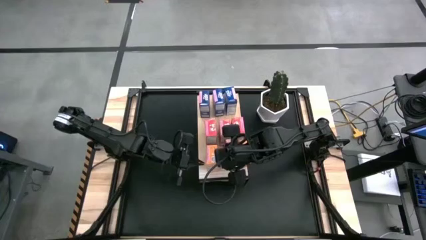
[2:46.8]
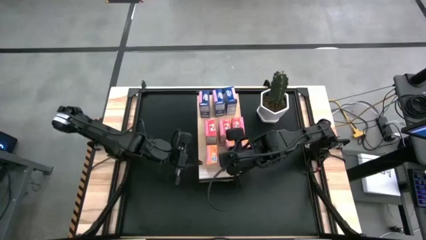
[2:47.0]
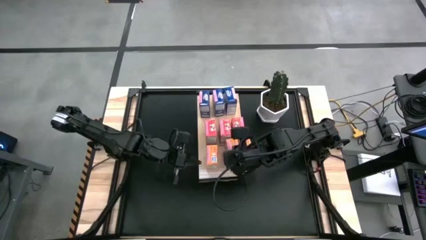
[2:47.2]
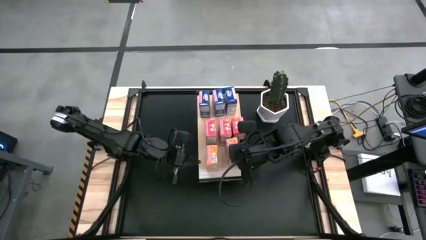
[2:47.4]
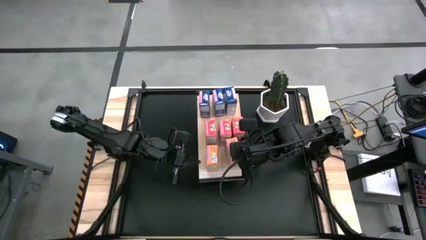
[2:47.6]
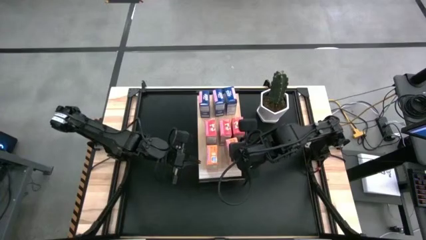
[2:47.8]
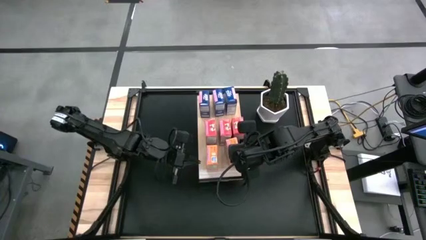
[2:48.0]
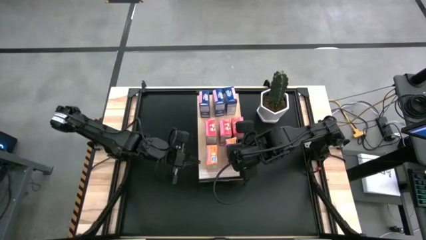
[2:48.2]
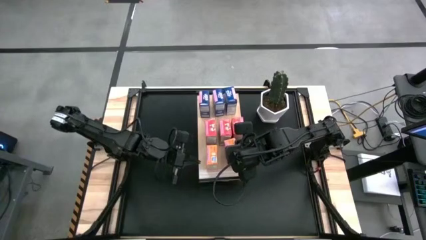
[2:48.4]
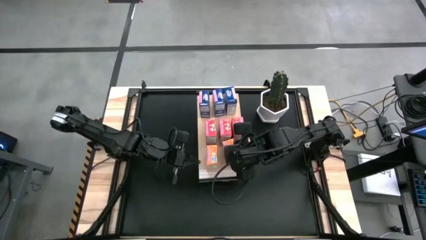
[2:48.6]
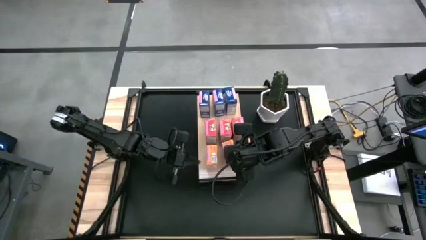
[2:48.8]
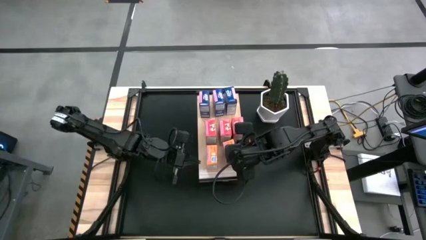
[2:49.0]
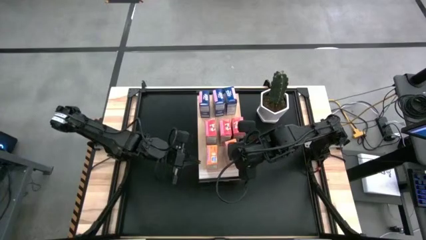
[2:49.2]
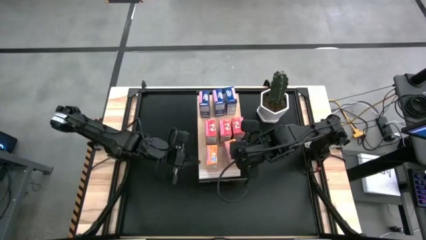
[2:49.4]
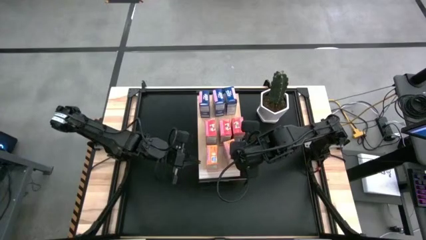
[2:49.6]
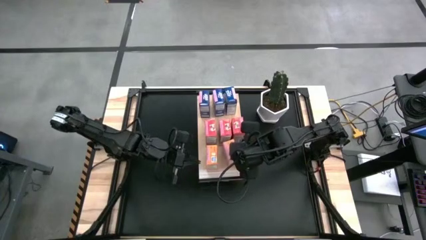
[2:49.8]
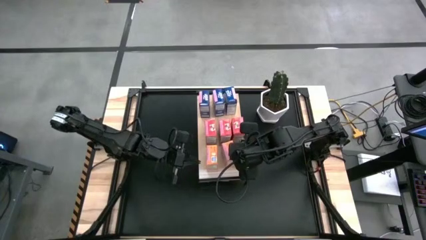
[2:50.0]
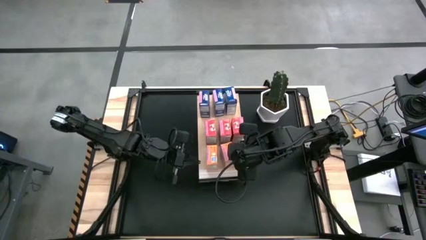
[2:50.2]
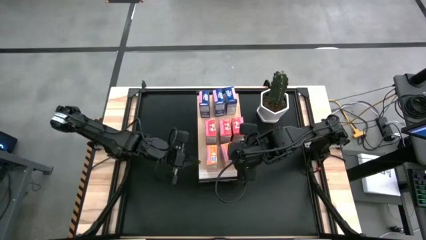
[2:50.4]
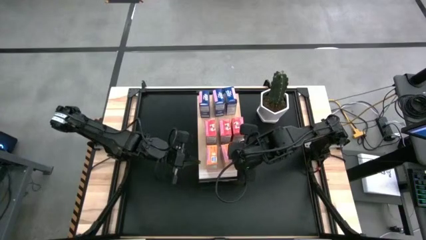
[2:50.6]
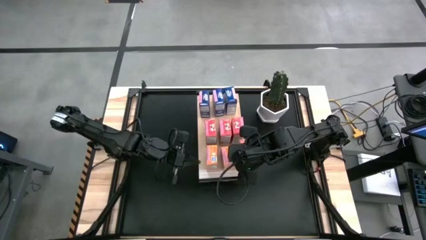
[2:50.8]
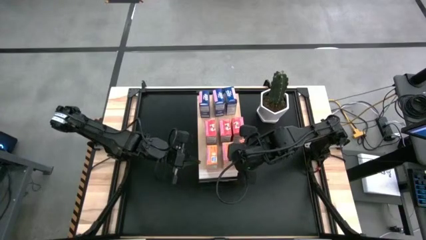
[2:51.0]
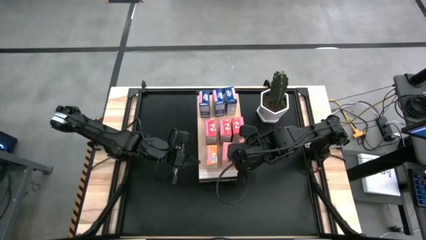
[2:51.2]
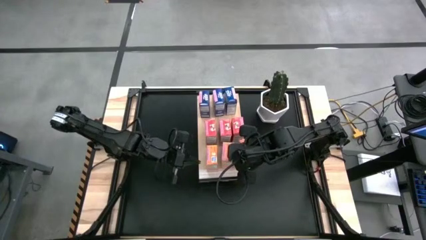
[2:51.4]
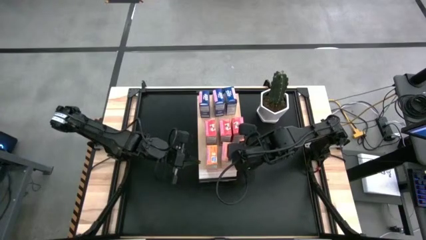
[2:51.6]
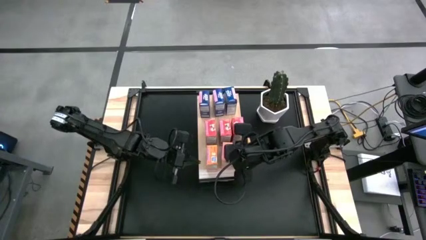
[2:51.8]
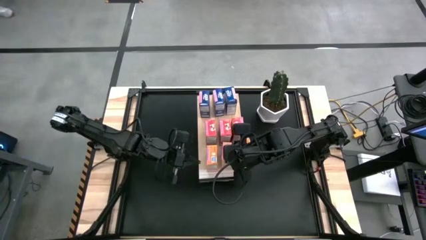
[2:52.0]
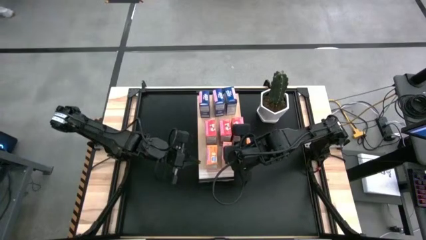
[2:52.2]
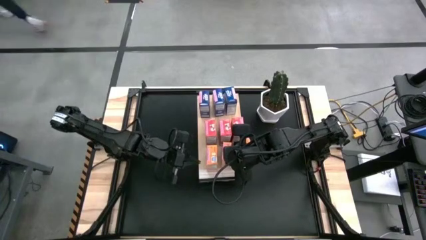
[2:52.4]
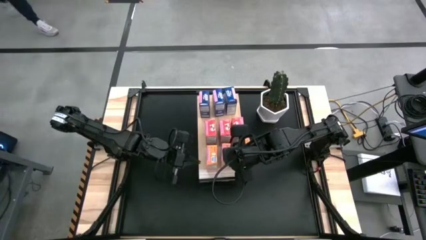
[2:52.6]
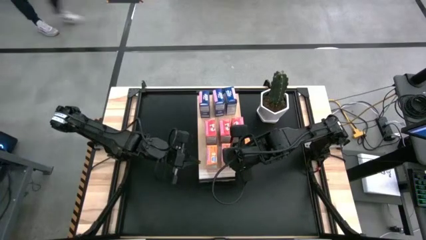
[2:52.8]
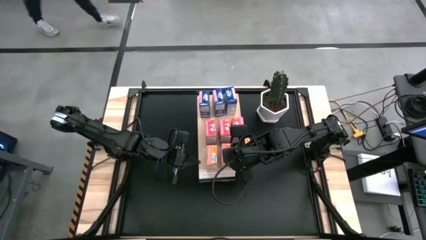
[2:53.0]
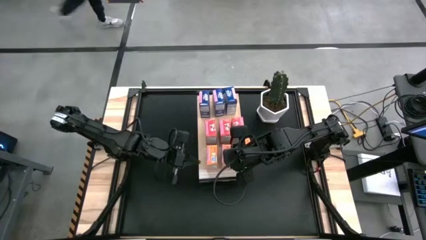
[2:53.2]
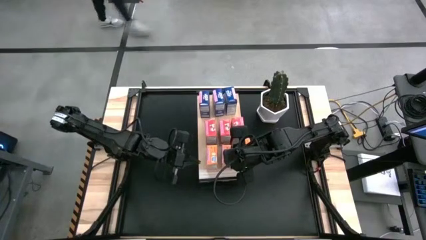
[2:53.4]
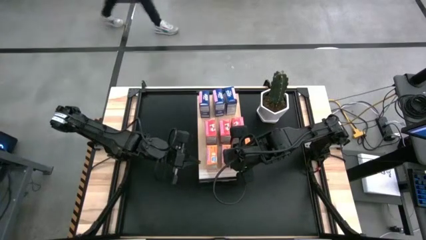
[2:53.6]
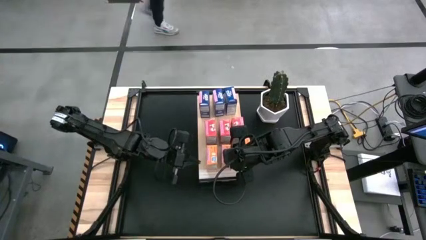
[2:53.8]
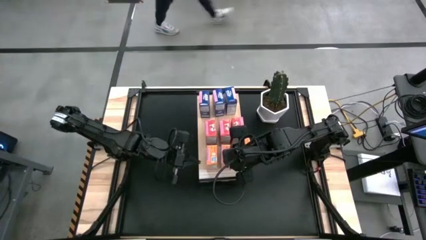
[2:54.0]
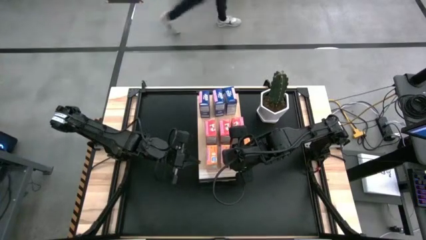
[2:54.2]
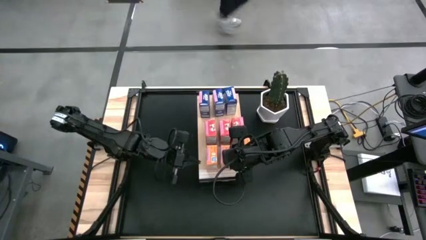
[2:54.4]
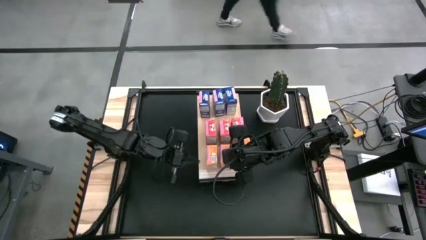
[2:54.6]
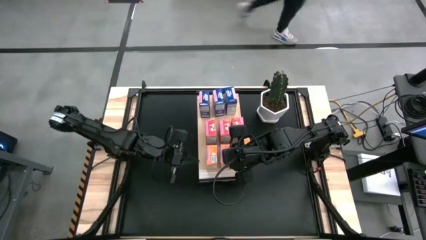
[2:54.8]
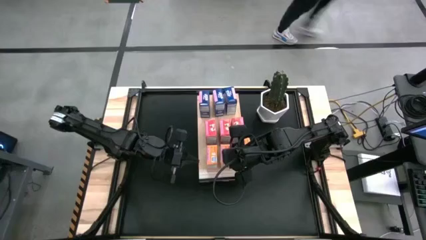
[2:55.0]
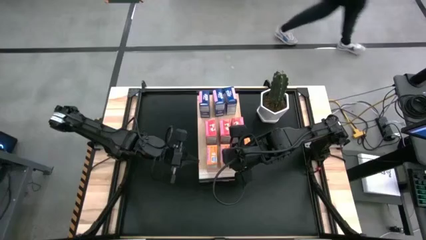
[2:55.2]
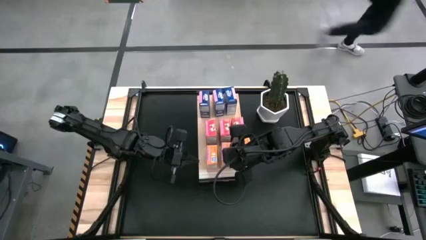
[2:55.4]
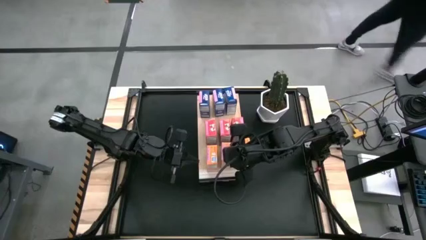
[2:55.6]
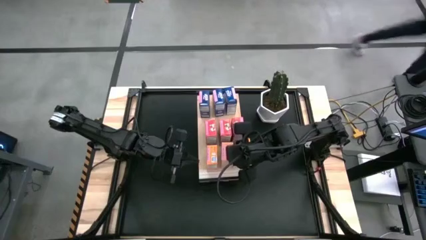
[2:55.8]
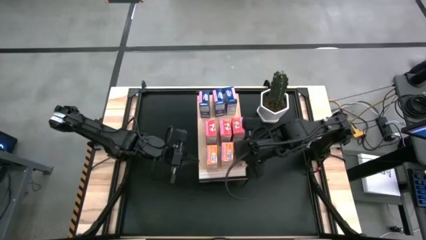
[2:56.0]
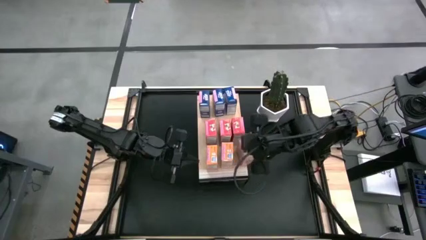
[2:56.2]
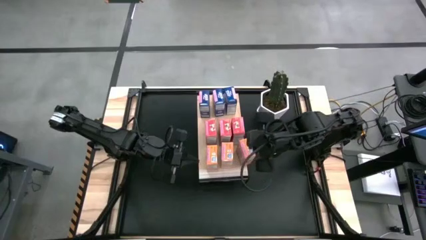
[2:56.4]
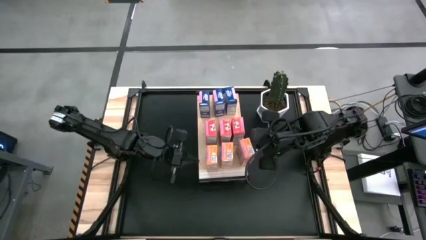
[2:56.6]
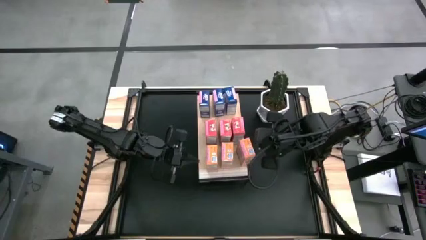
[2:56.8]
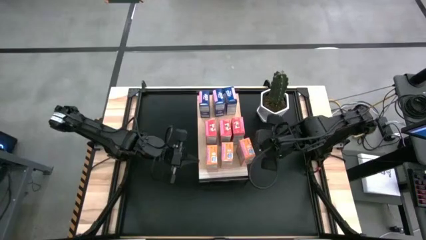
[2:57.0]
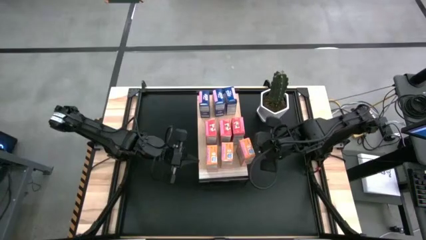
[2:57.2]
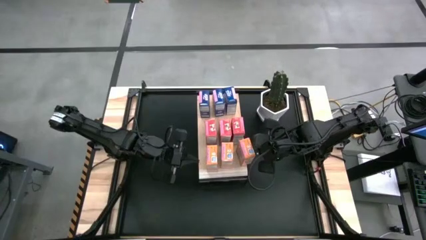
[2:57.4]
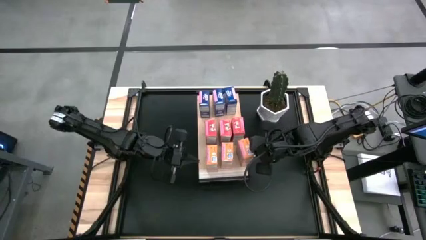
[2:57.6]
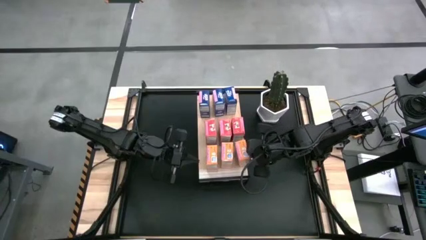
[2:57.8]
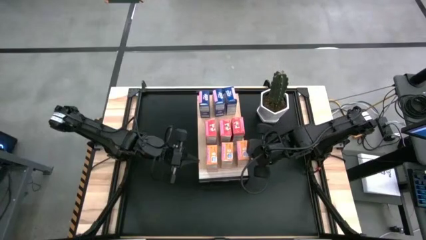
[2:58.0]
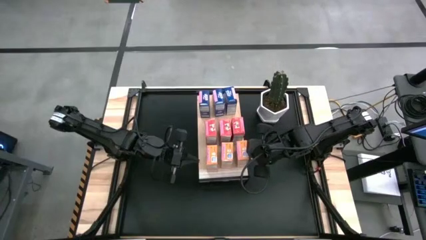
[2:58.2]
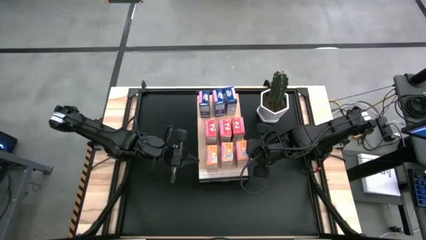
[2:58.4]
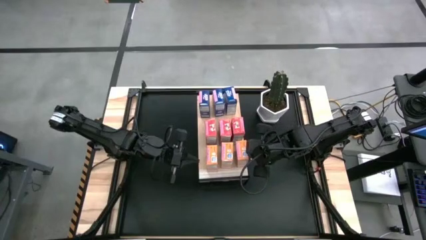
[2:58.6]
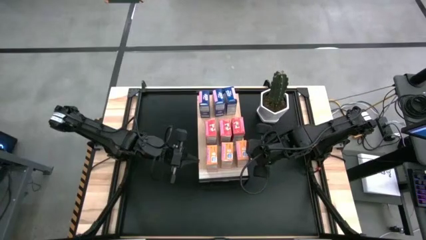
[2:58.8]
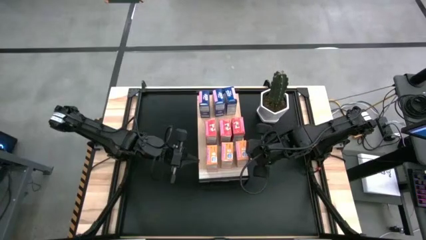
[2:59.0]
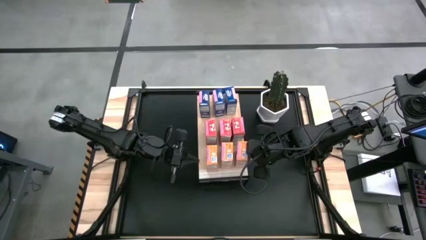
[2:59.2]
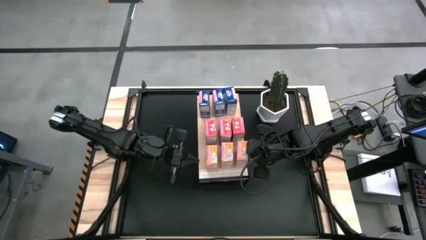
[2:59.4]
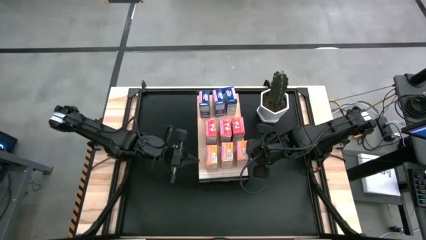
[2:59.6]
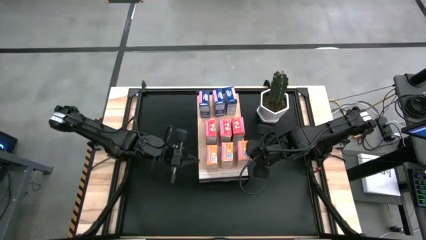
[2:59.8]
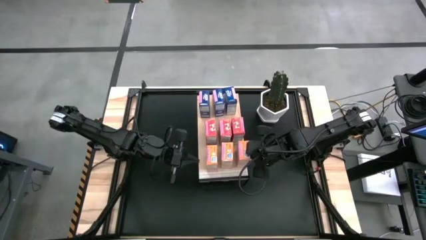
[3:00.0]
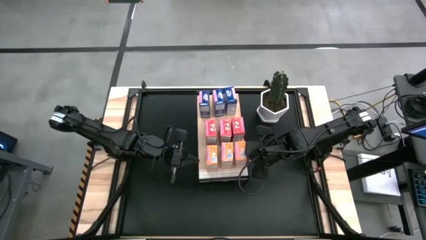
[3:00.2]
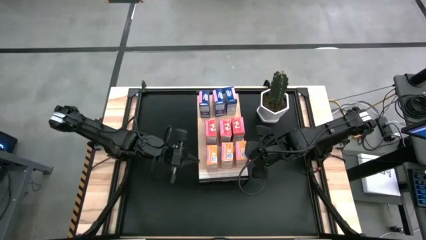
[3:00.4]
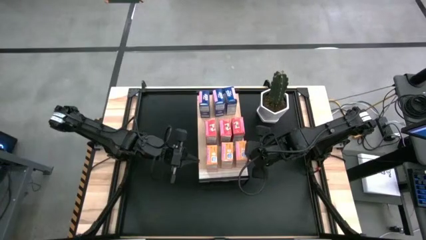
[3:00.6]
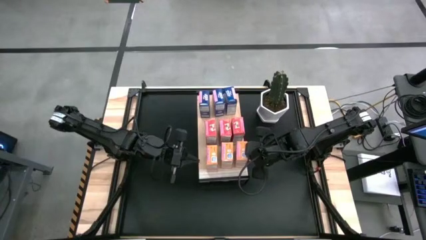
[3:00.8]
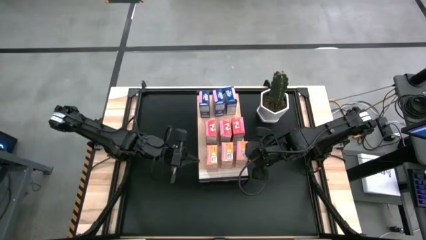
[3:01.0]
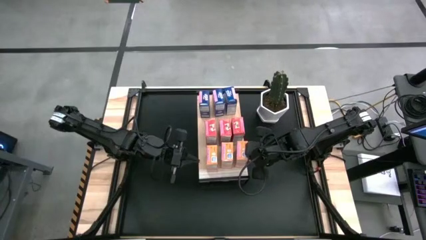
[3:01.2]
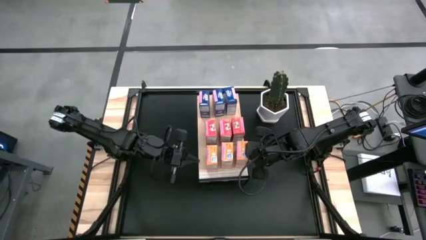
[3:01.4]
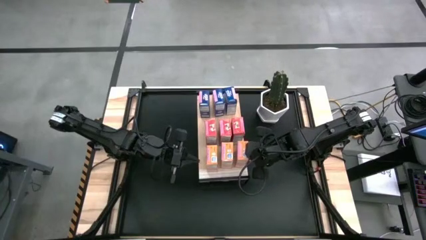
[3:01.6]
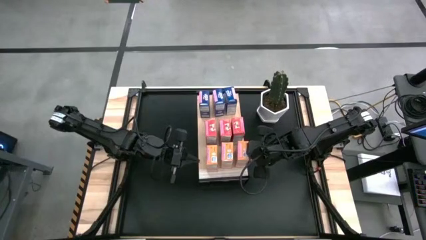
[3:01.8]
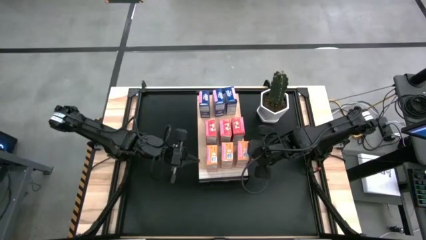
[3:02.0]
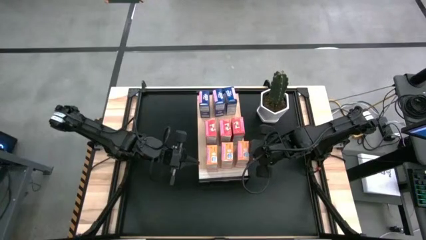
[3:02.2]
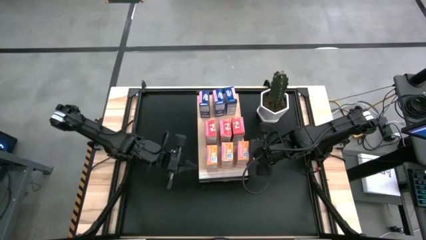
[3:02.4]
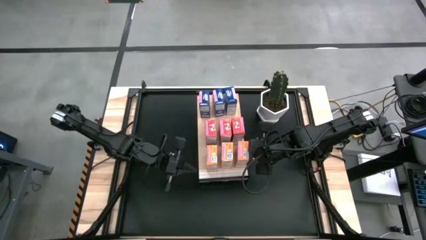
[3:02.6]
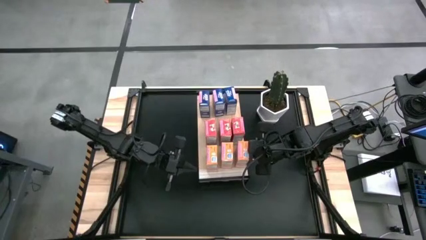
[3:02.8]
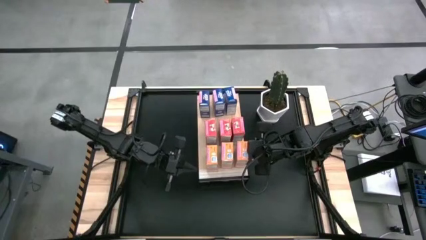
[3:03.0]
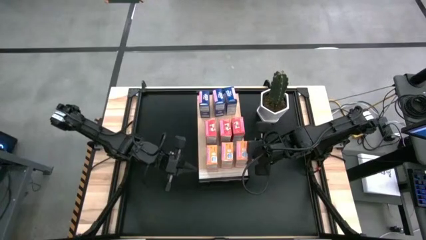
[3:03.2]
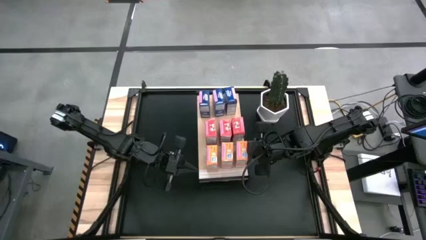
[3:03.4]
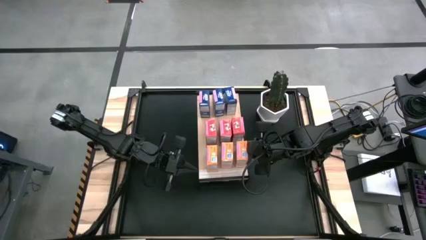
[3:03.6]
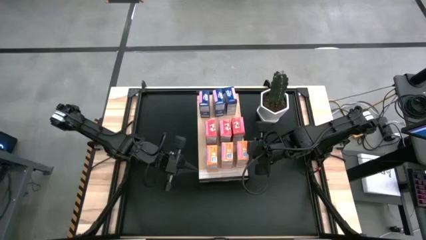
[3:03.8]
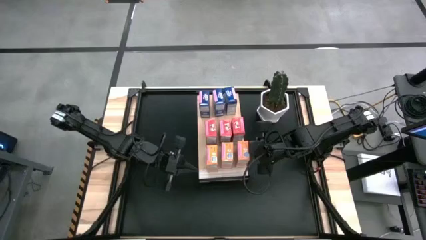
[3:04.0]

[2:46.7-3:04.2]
Task: Stack cereal on shelf
Adjust the orange cereal boxes
